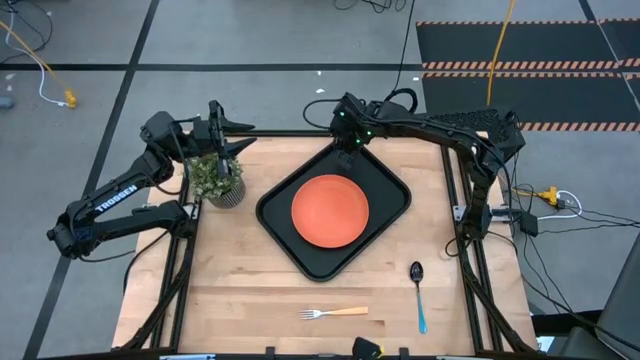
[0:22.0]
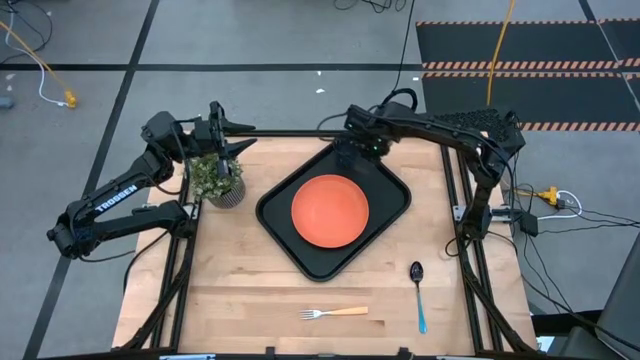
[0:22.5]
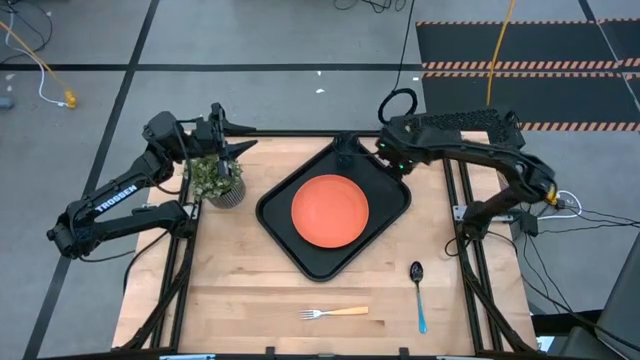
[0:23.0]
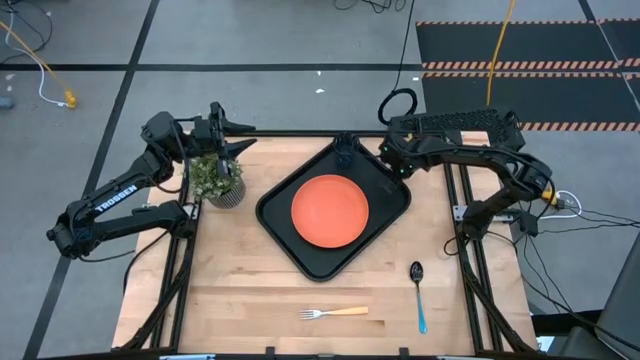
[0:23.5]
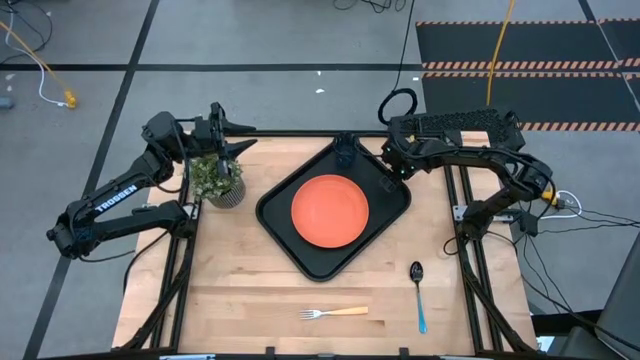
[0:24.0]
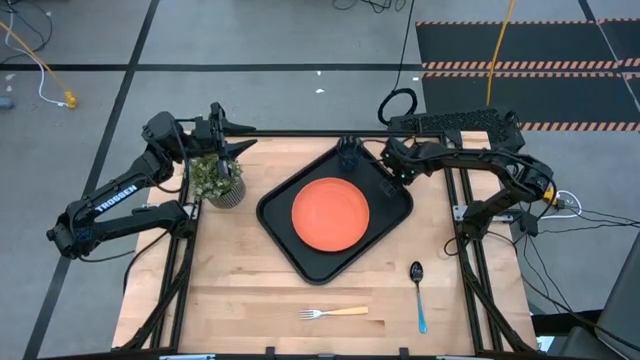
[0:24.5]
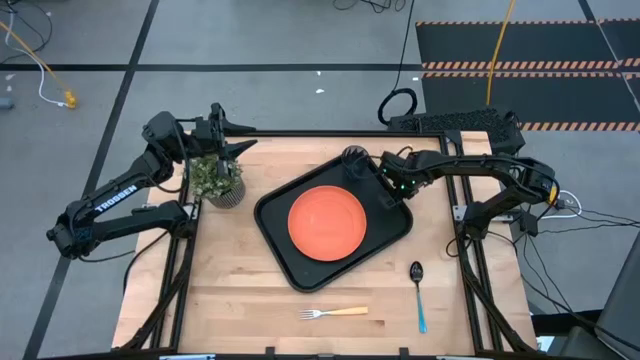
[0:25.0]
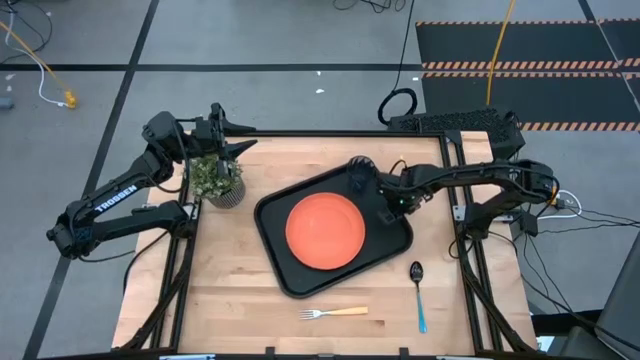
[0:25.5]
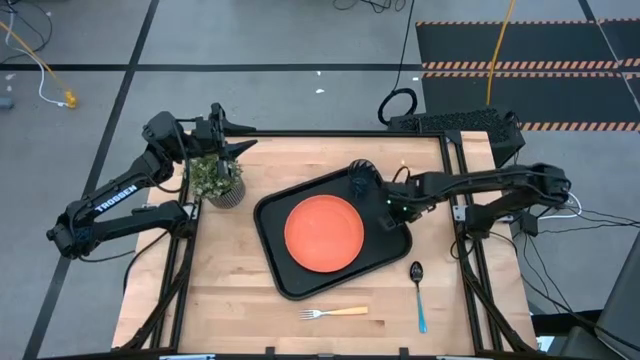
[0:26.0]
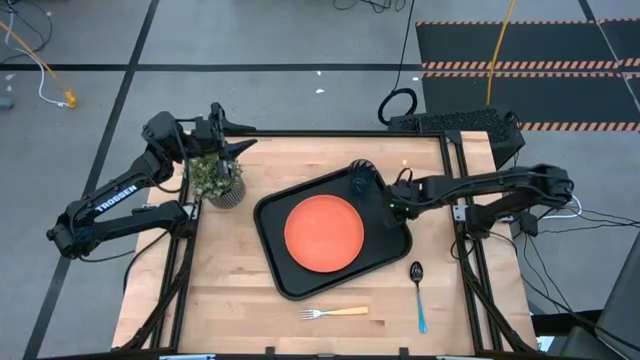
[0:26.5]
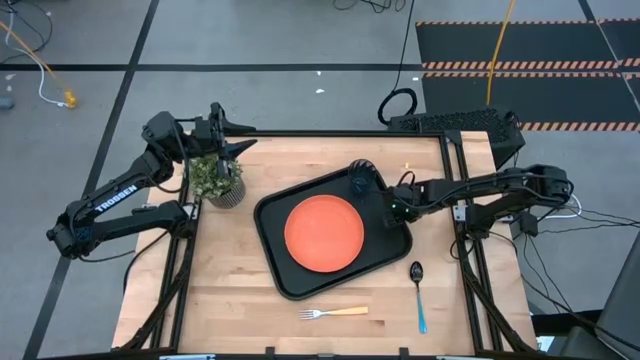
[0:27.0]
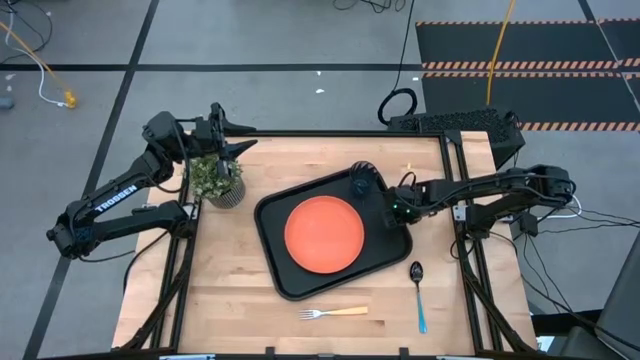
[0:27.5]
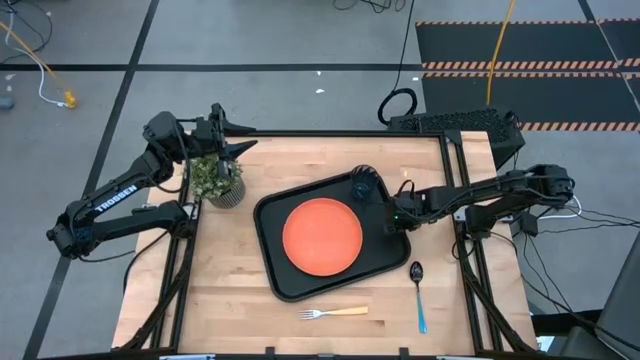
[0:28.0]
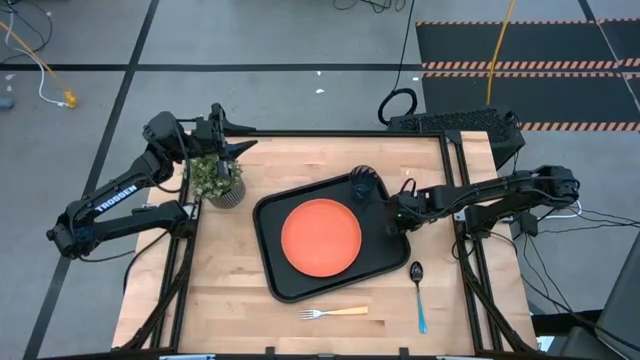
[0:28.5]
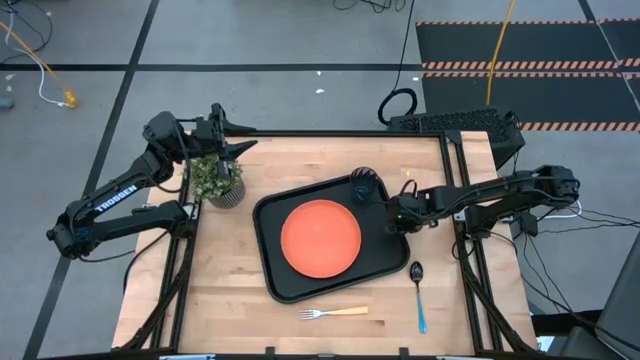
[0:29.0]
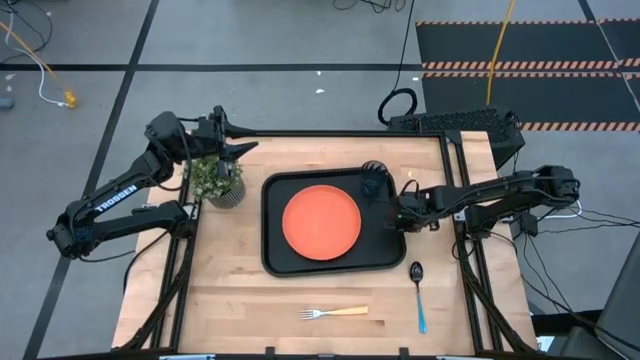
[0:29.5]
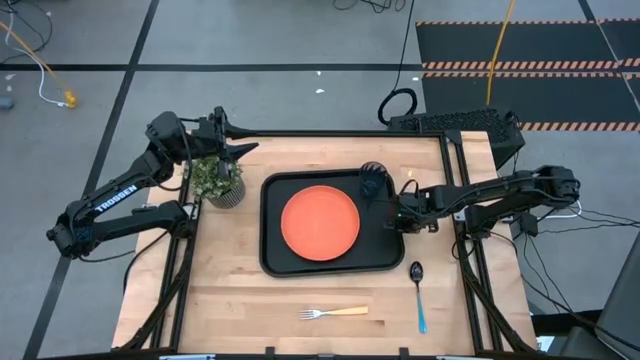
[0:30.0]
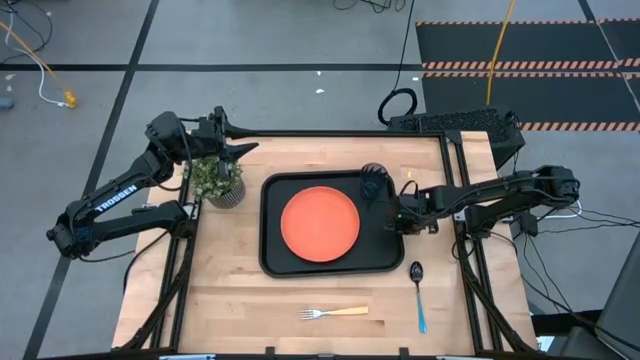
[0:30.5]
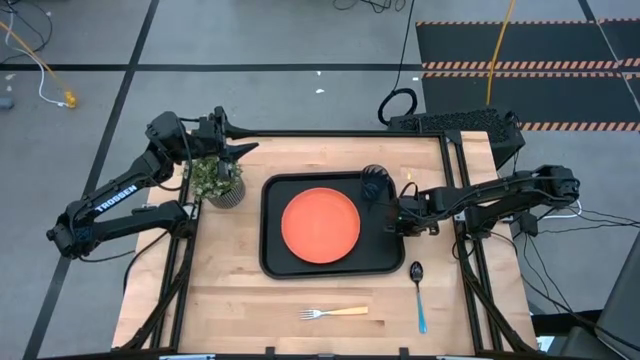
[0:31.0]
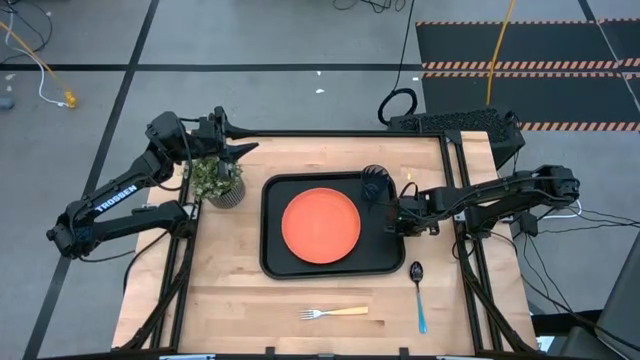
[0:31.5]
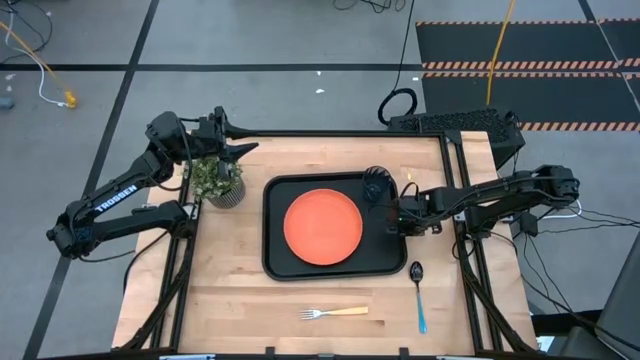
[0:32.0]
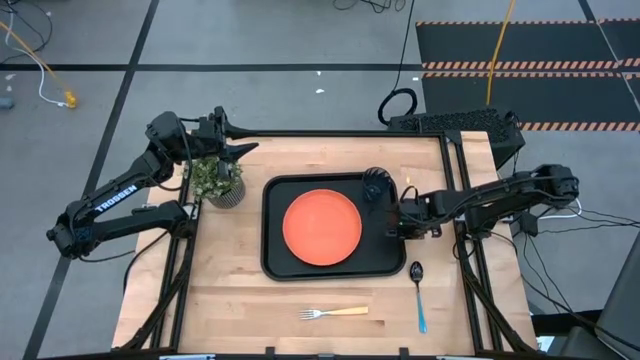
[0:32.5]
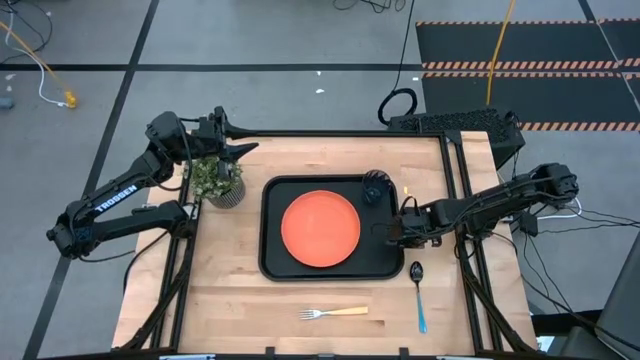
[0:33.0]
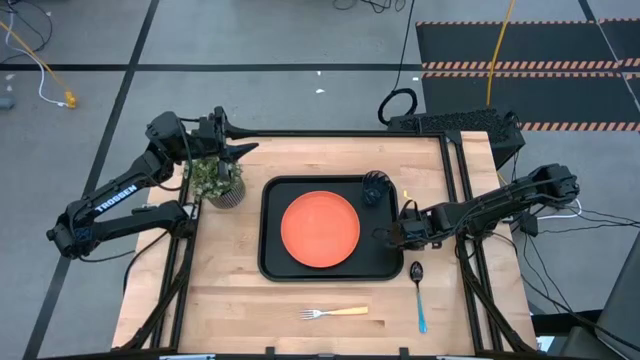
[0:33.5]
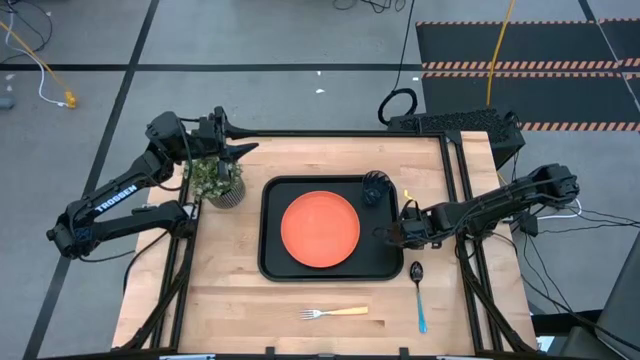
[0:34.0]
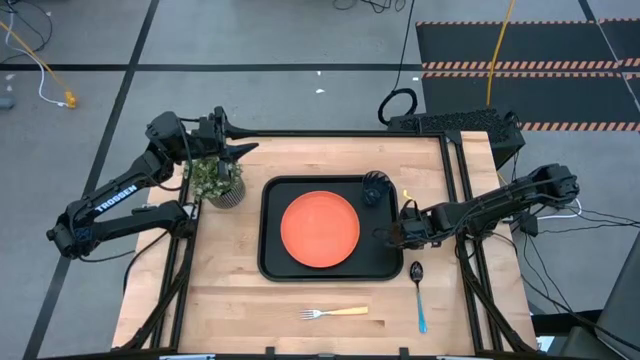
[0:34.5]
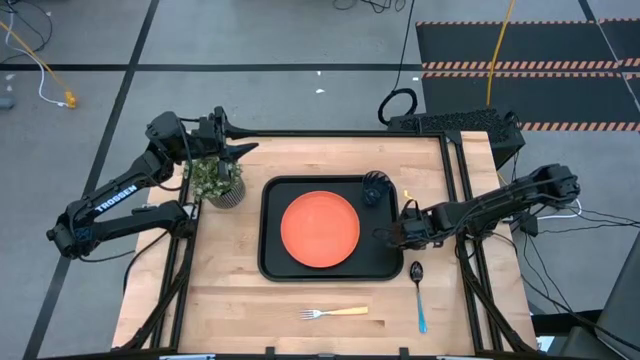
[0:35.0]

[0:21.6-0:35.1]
Task: Pick and place plate/cup/fork/spoon on tray
Move the black serving tray to the center of the table

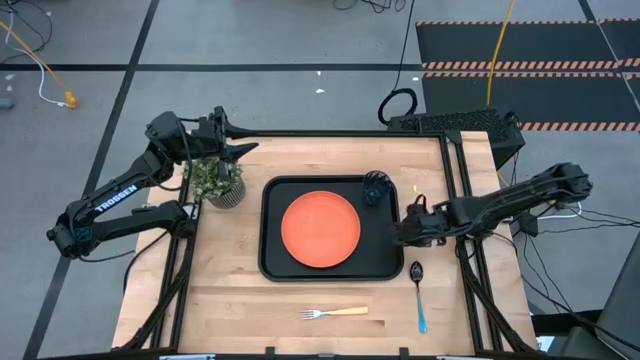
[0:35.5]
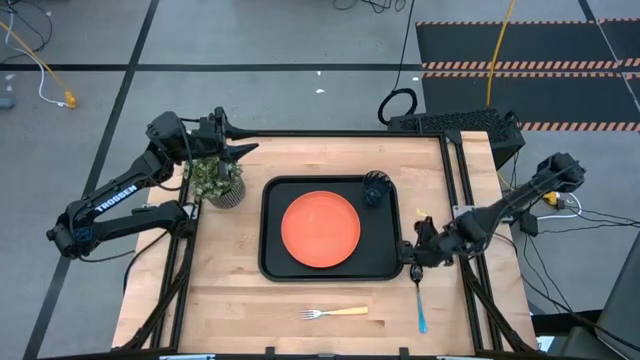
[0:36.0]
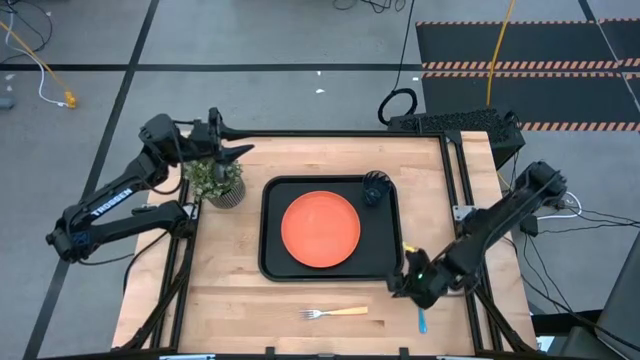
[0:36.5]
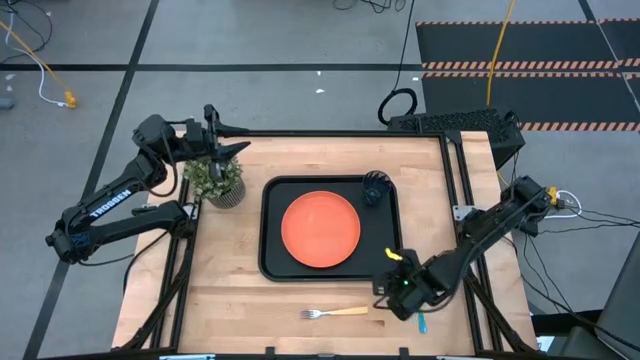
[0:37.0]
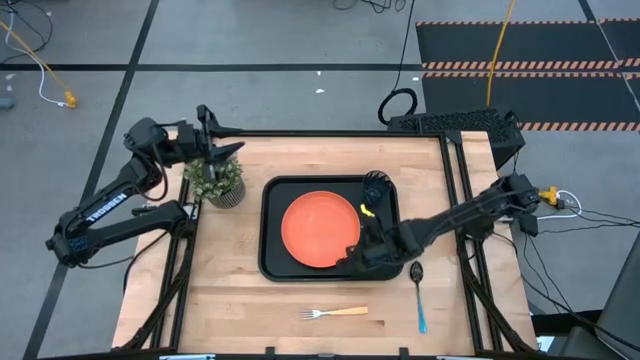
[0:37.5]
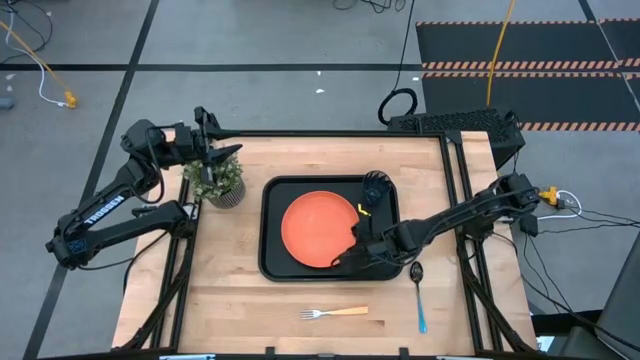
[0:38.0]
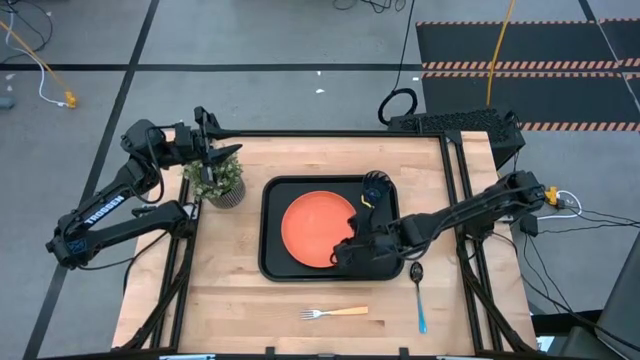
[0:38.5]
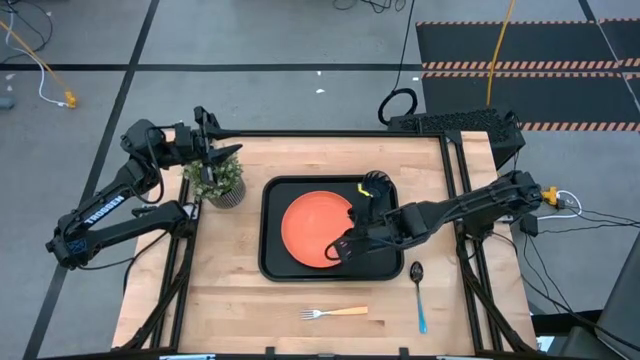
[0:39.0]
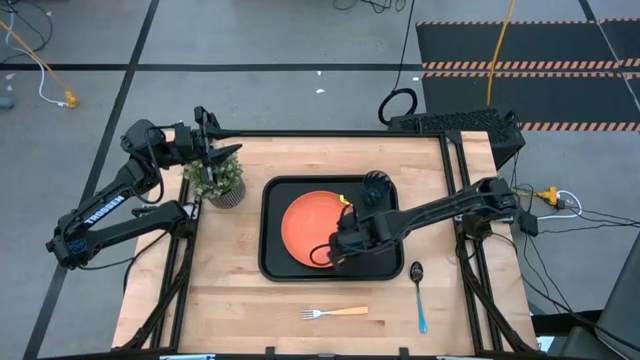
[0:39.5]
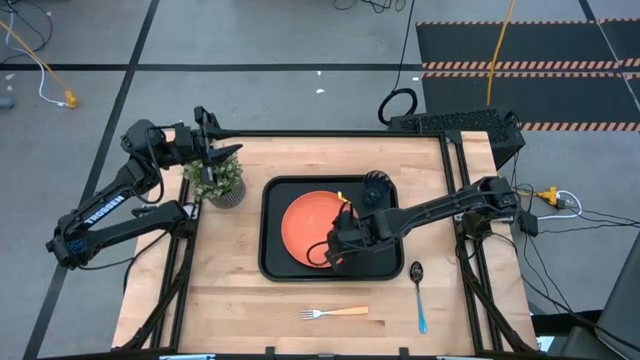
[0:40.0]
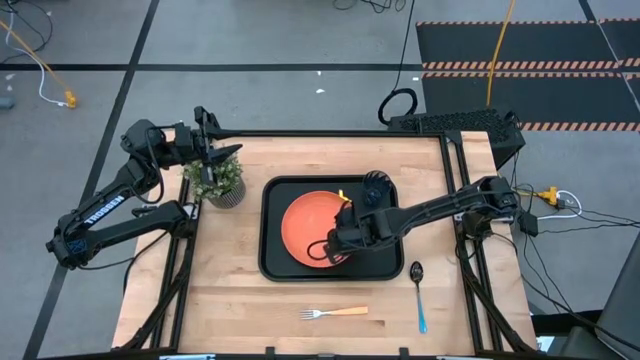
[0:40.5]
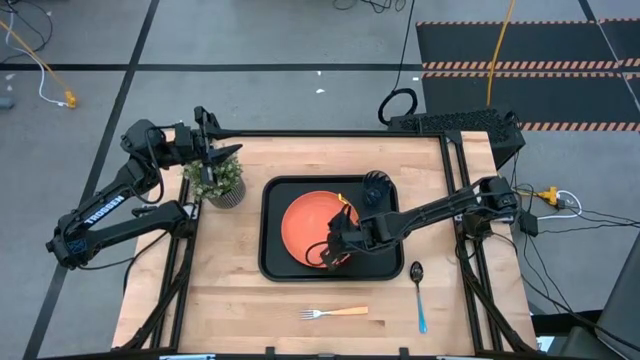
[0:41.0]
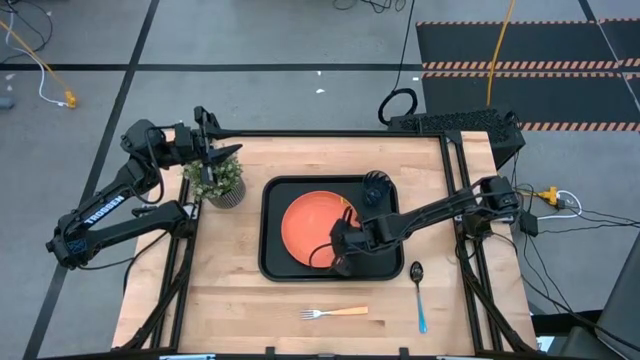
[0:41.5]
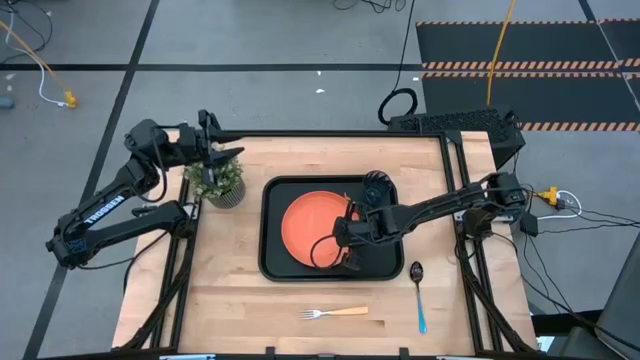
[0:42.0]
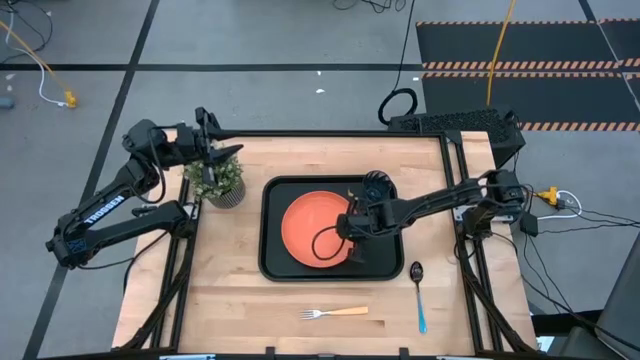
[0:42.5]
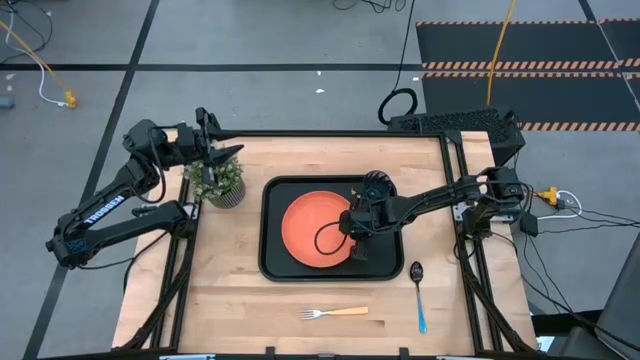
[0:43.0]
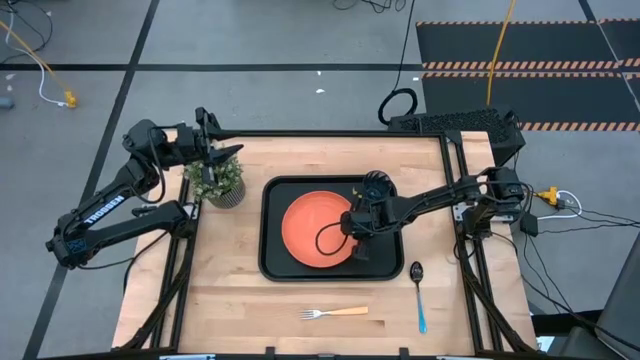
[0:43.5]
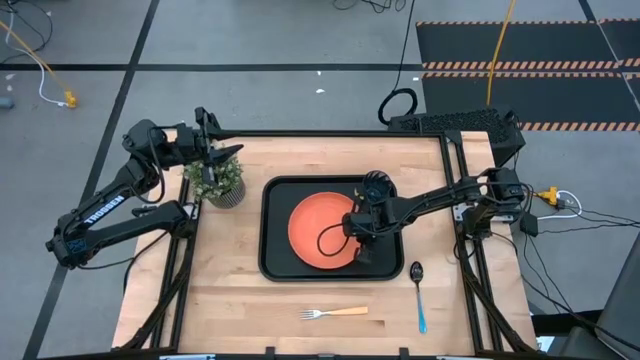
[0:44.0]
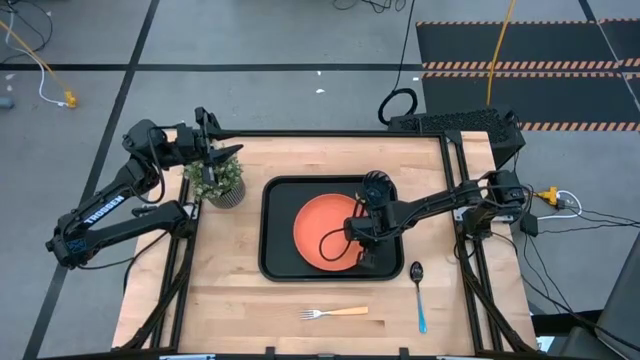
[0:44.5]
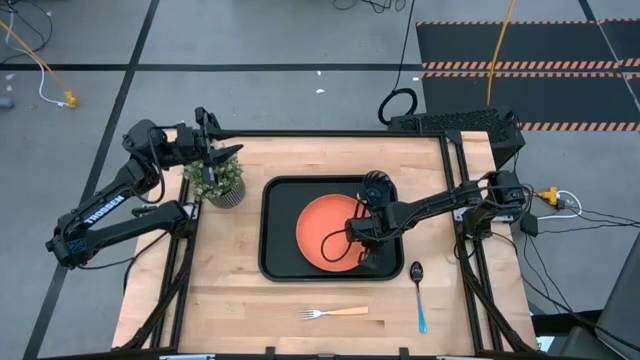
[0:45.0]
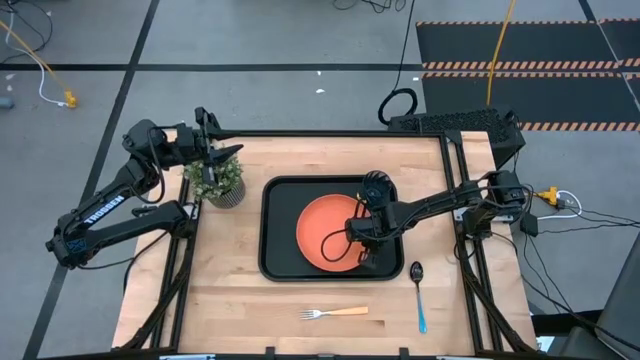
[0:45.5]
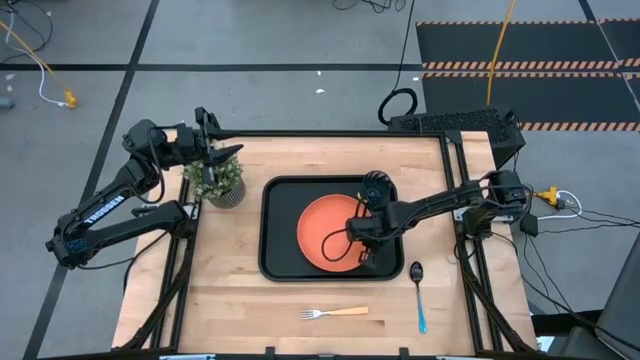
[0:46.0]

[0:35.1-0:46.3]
Adjust the orange plate on the black serving tray
